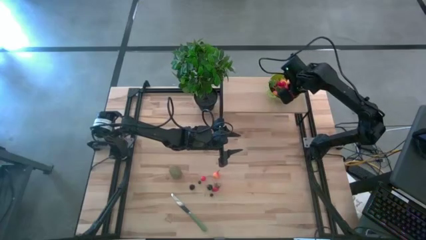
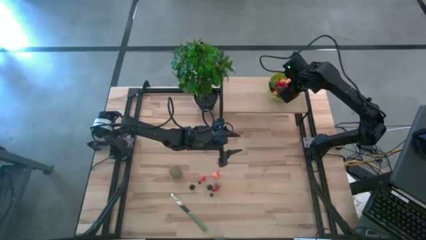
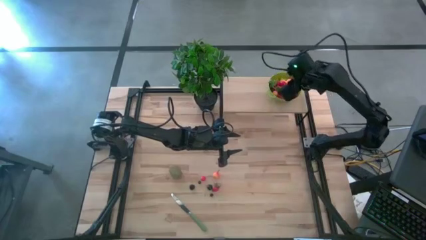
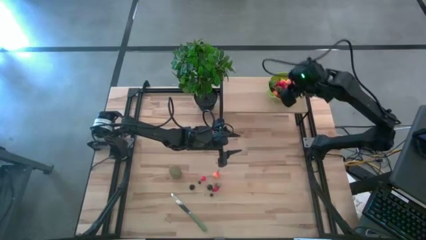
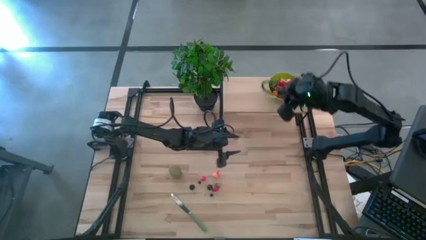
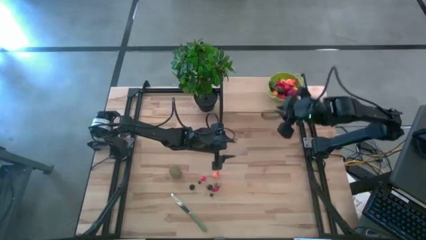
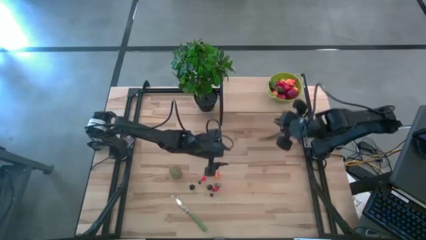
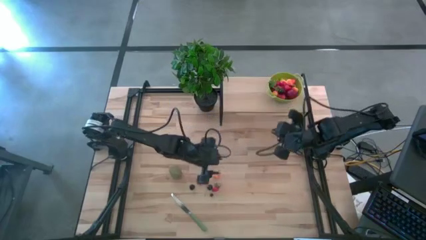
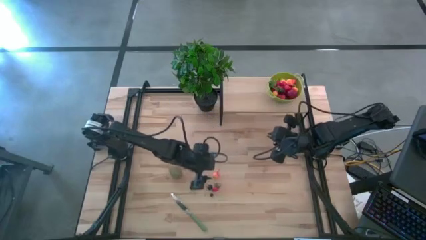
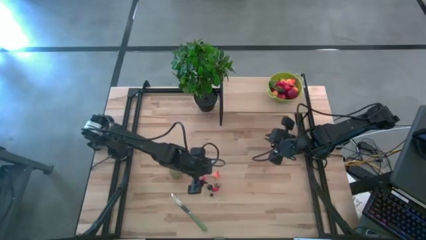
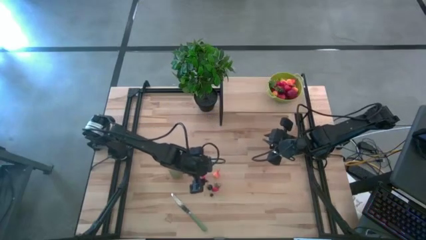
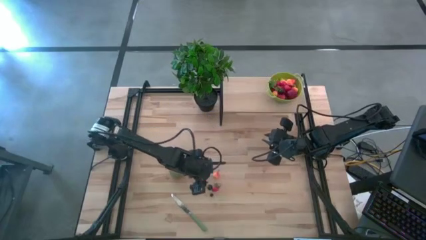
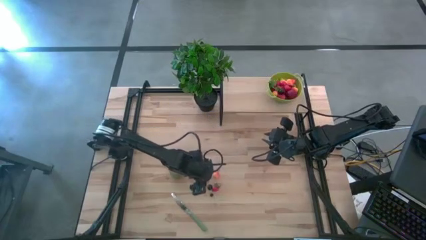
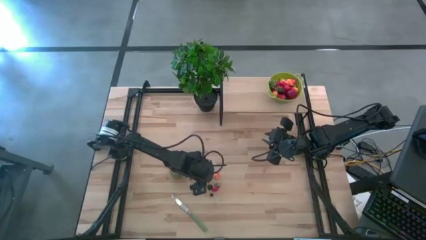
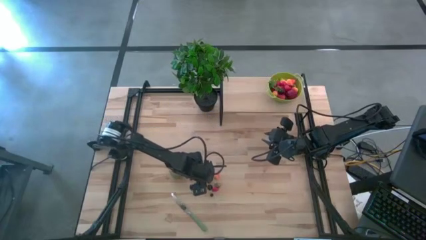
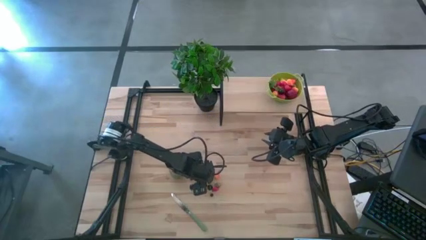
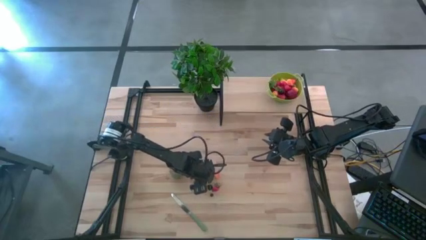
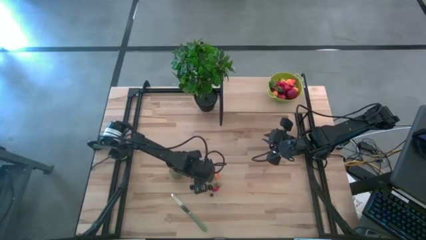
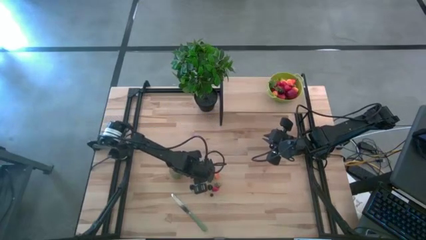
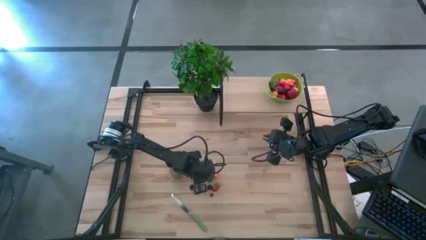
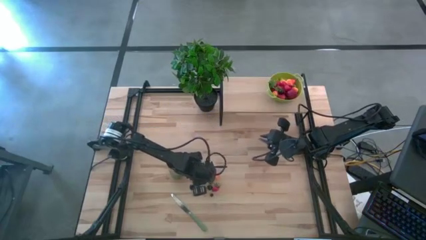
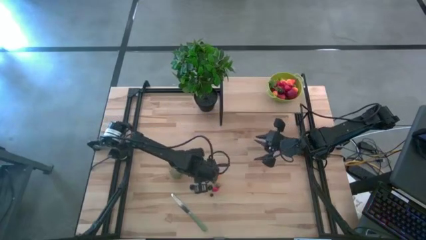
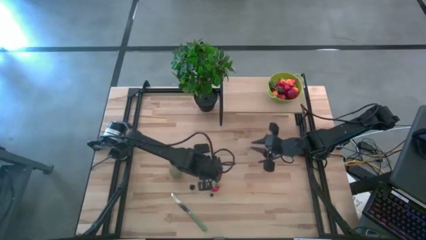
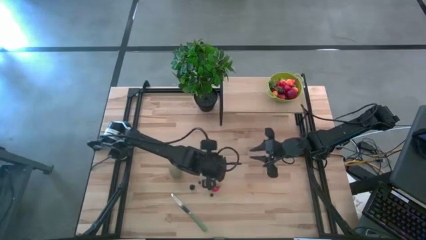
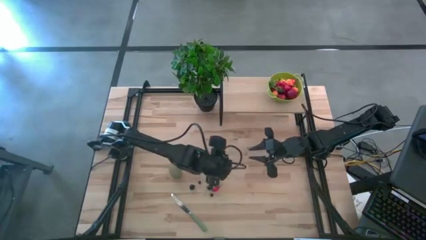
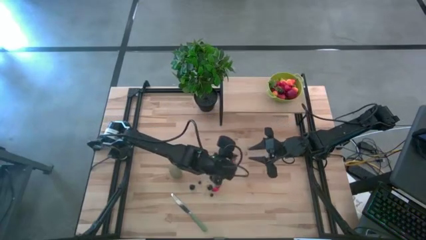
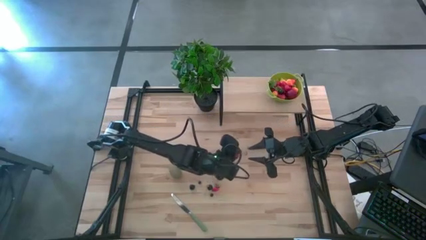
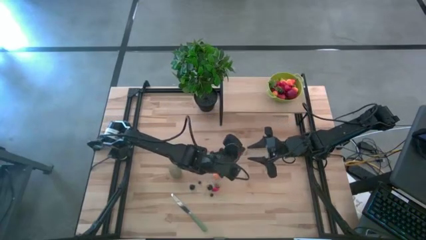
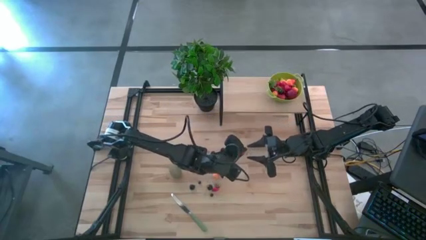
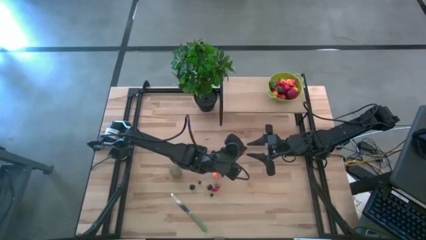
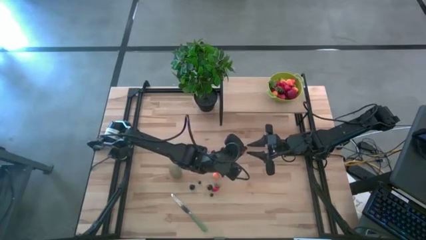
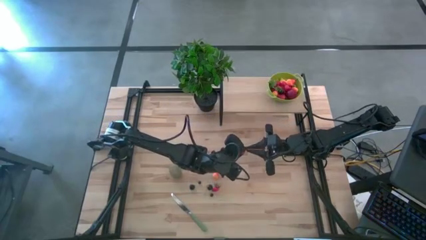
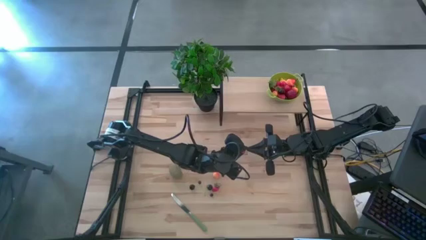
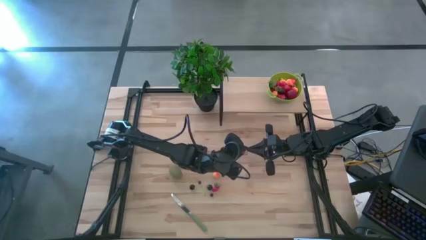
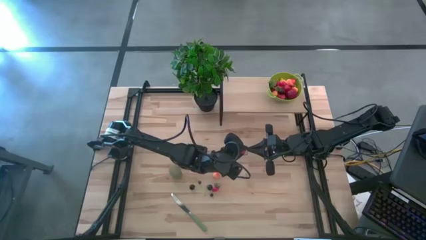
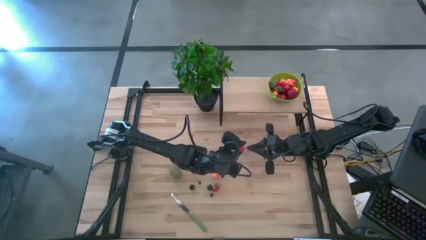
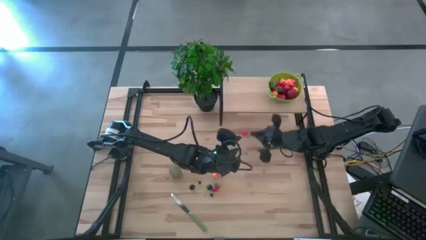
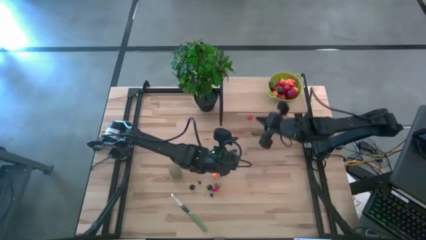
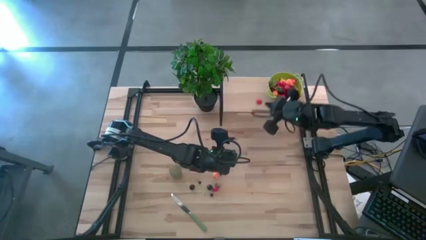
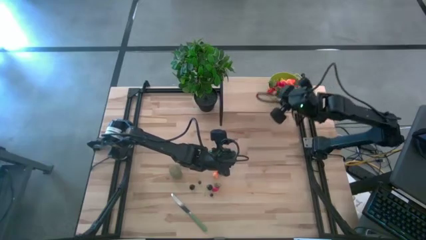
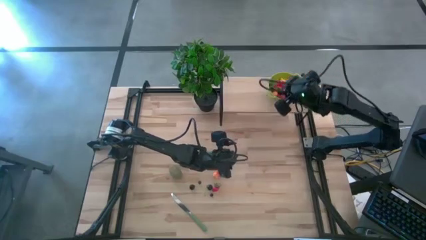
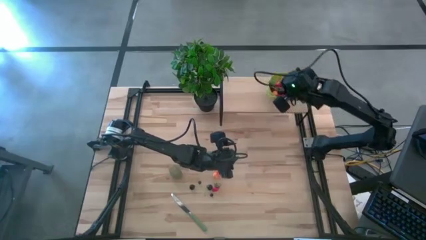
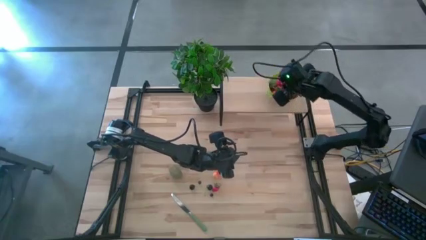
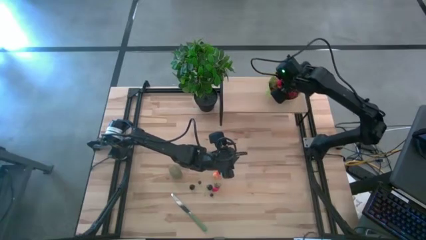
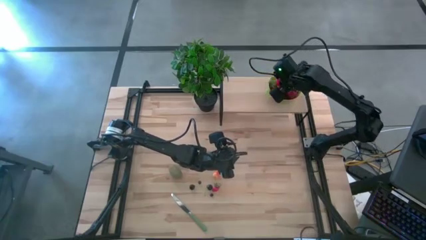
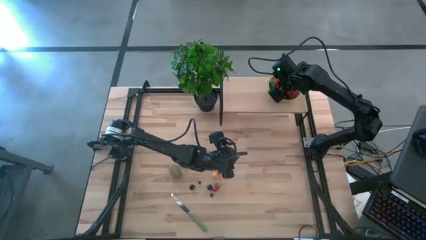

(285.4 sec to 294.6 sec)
Task: Pick & Place Fruit
Put the red cherry into the green strainer bowl on the shelf

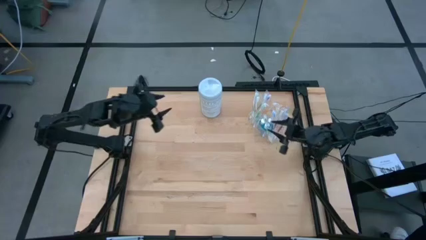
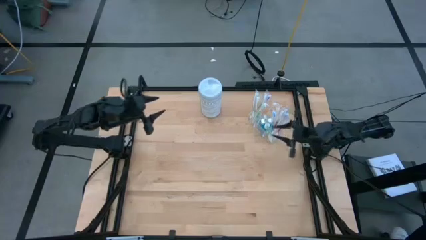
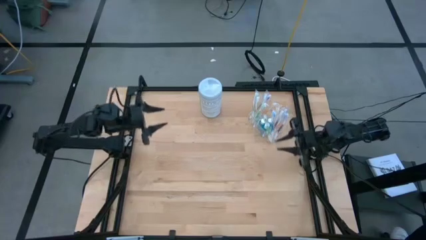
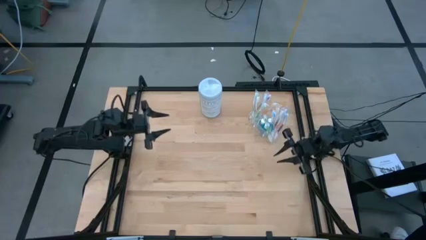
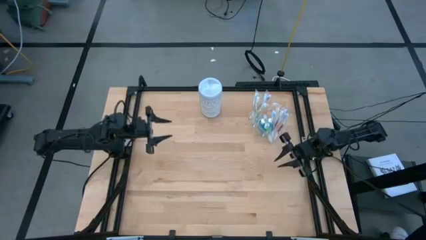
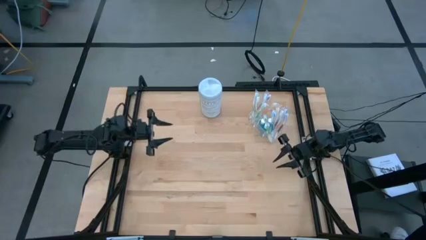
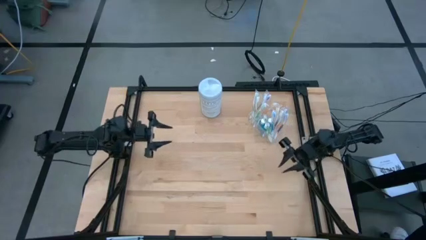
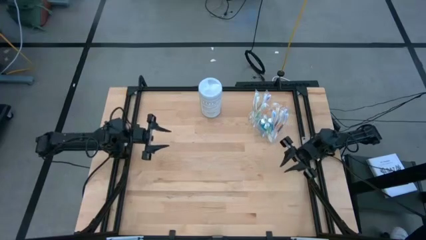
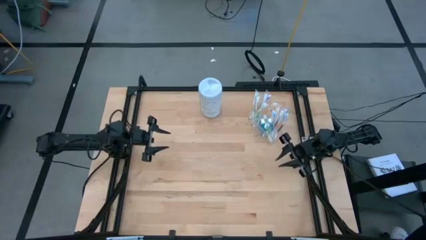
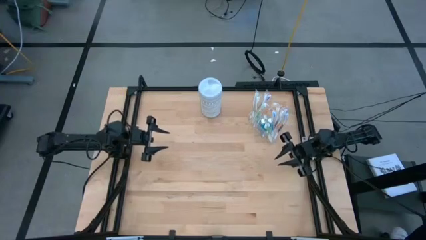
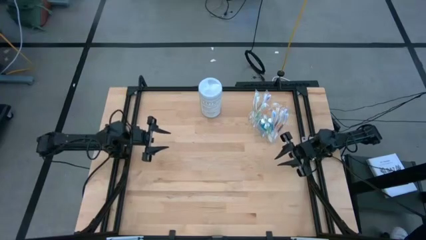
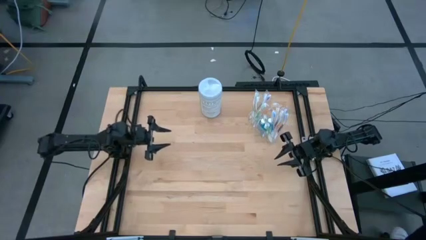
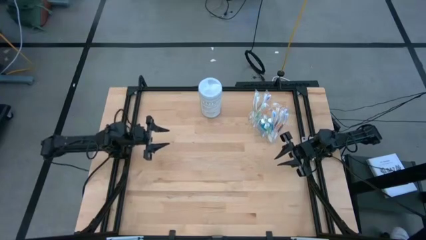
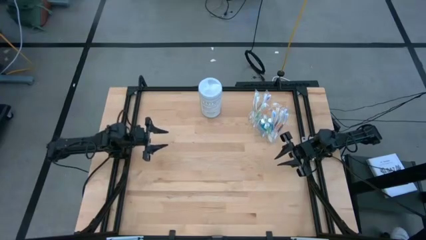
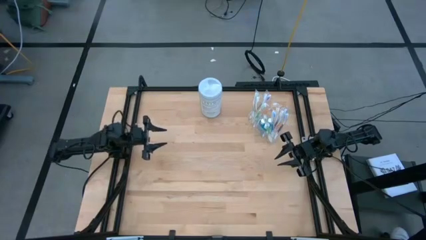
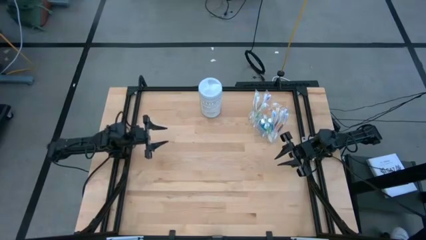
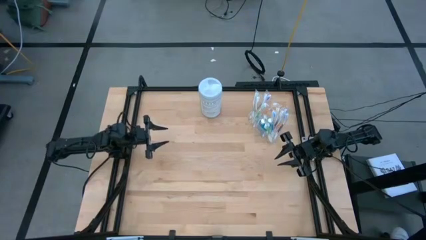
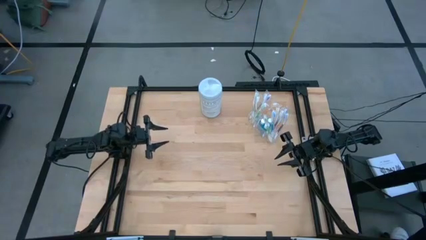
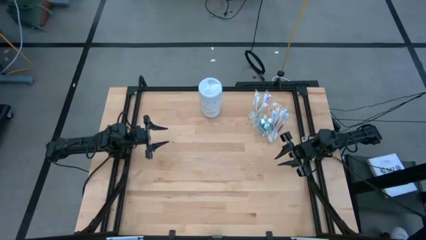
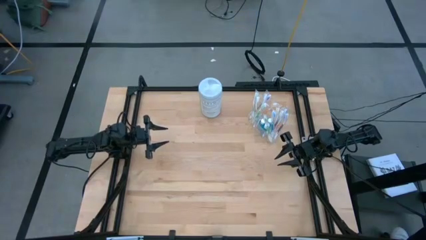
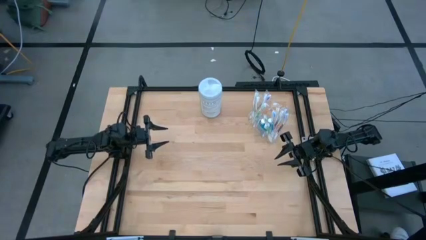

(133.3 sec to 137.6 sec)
Task: Pick & Place toothbrushing station
Return to Home Position
